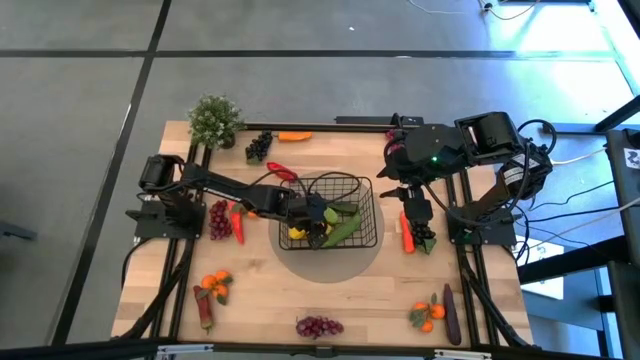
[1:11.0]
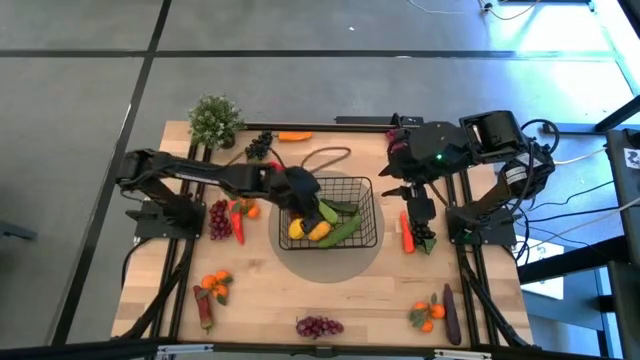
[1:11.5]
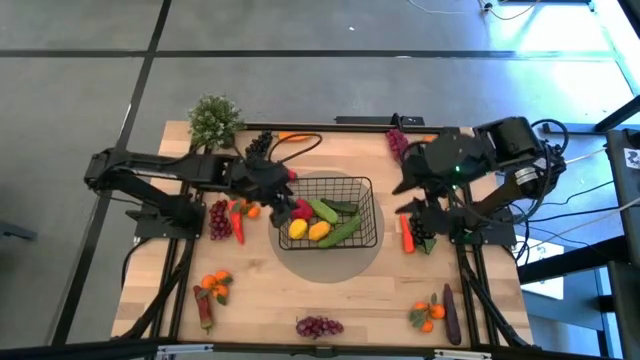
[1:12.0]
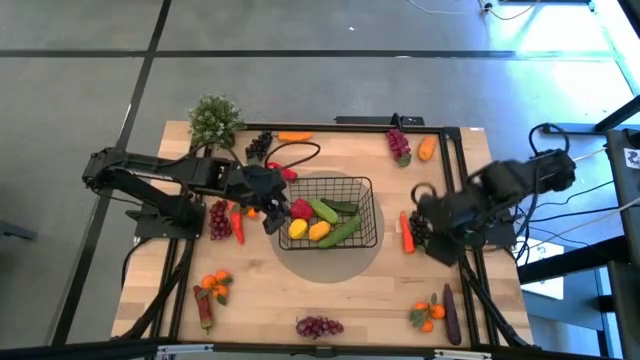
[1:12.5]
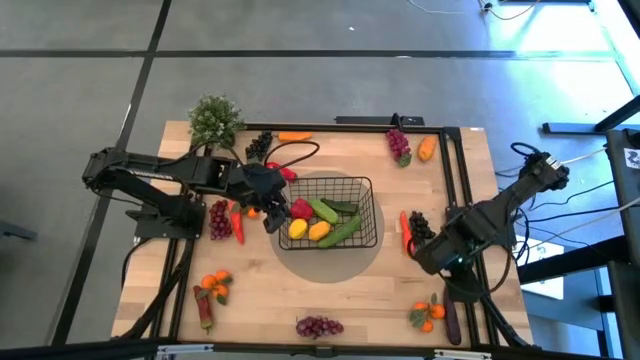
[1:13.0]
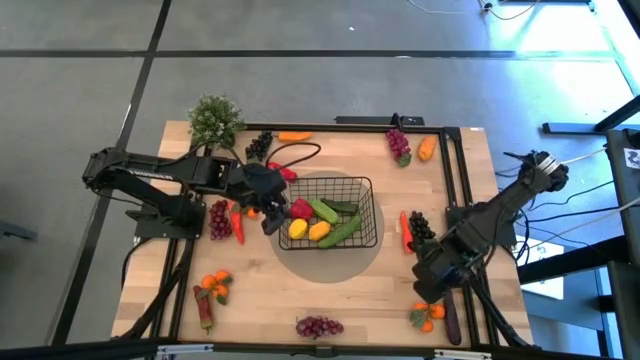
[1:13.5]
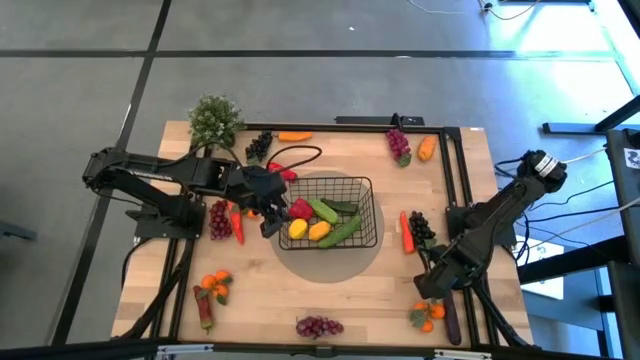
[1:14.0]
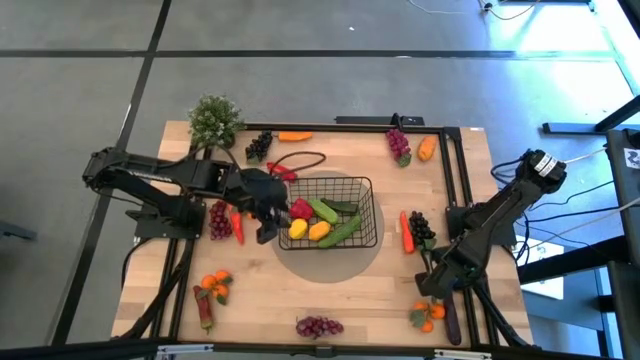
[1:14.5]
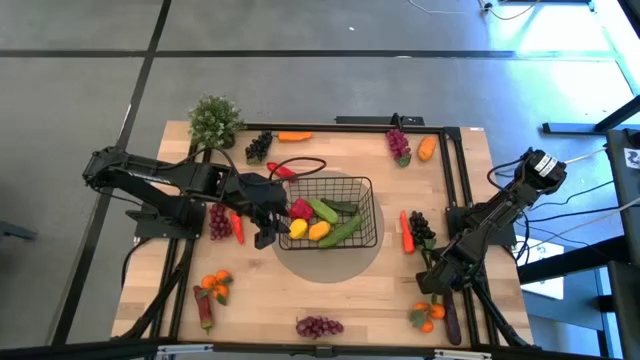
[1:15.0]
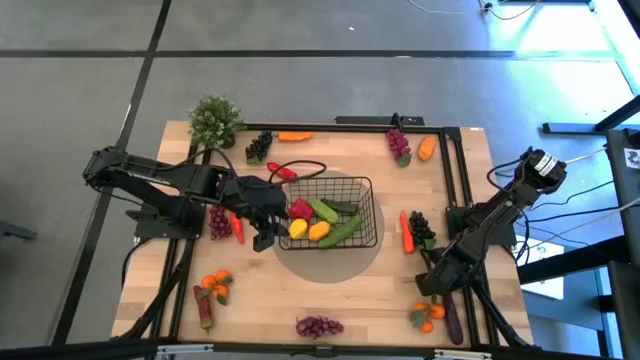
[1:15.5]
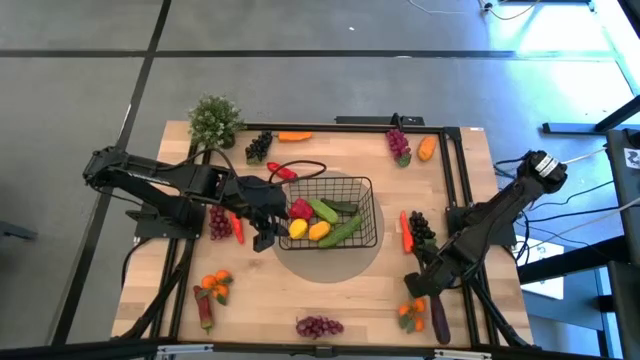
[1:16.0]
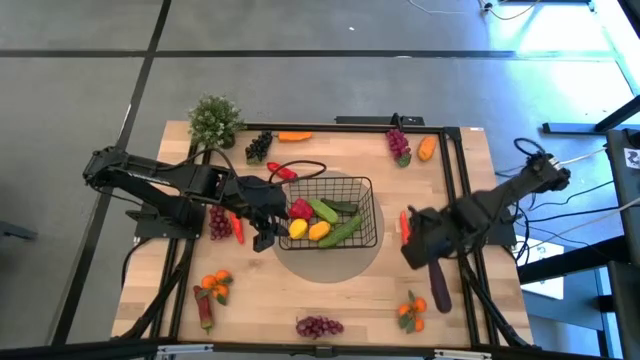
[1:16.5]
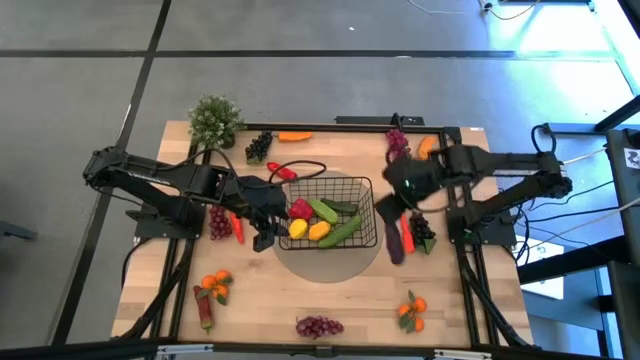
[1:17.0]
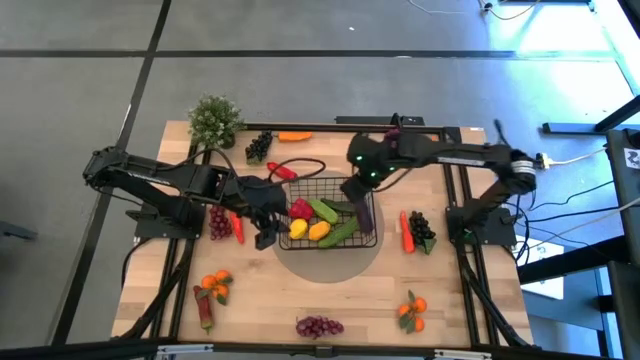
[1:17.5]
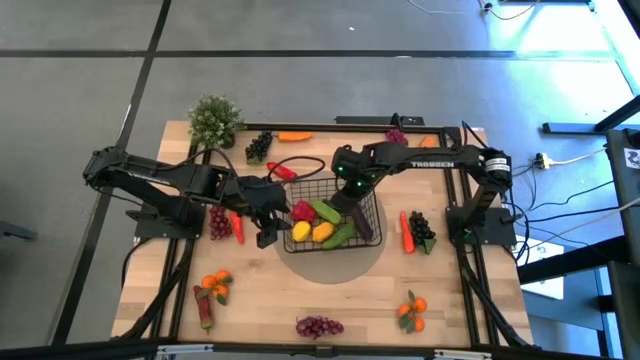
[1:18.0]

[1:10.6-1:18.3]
Task: Build produce basket
Put the eggplant into the basket

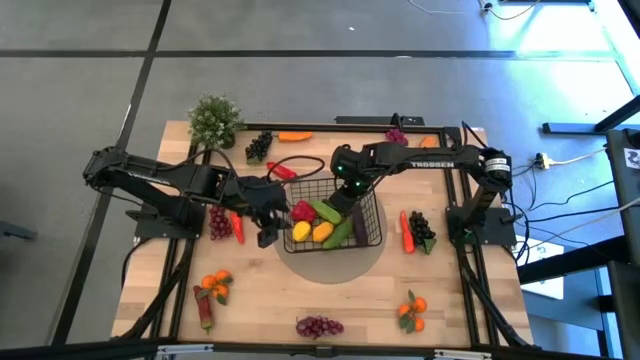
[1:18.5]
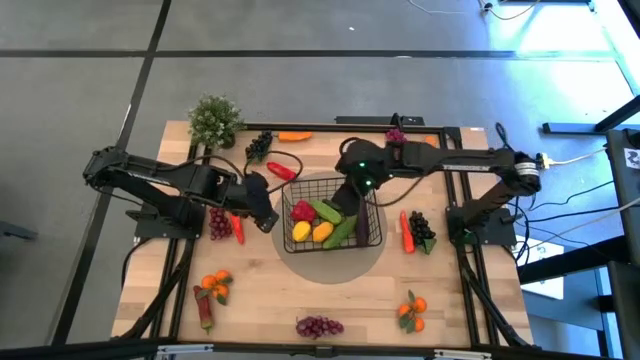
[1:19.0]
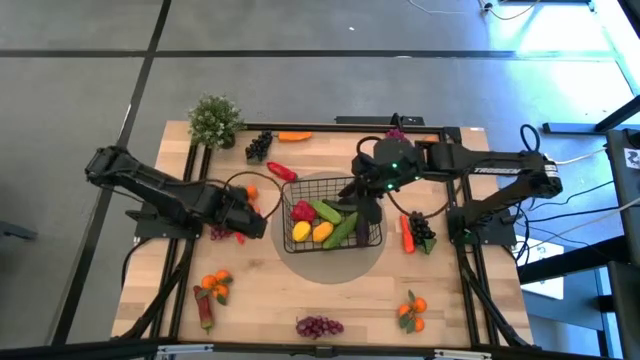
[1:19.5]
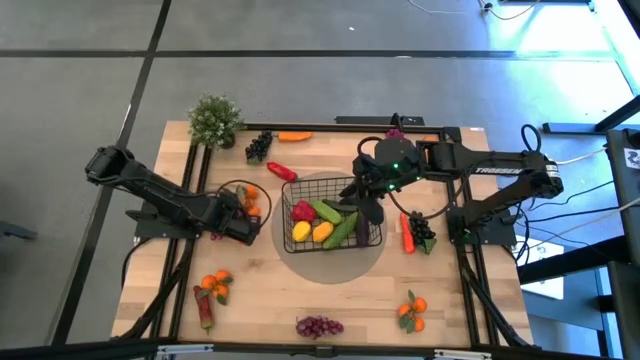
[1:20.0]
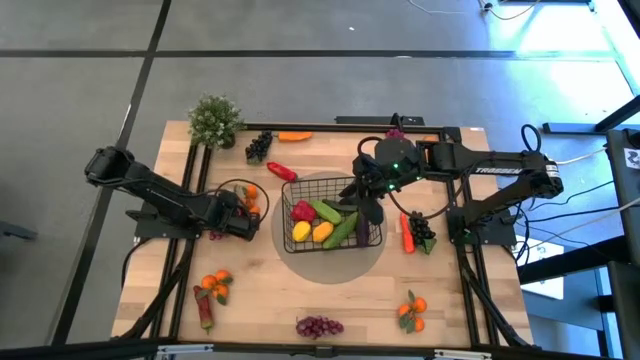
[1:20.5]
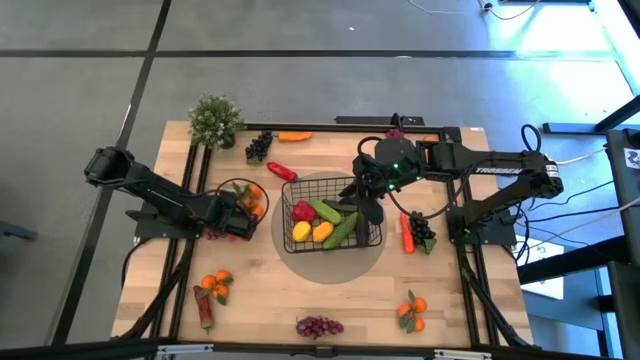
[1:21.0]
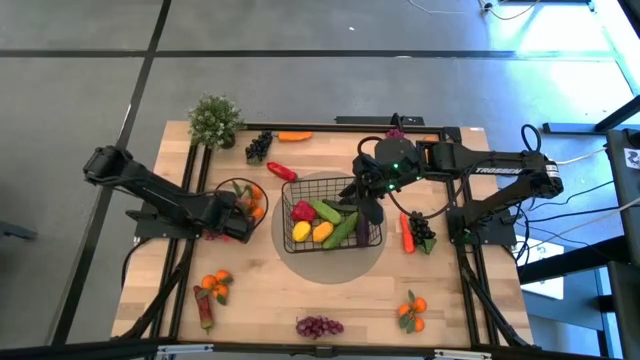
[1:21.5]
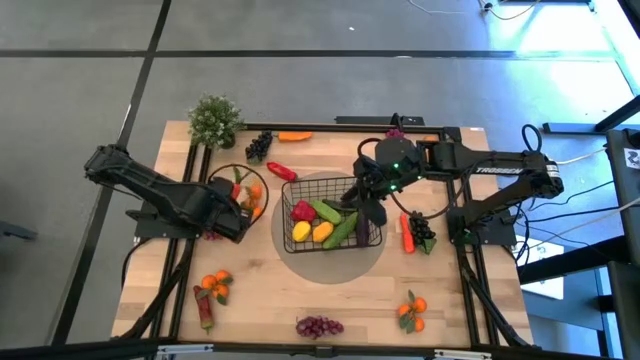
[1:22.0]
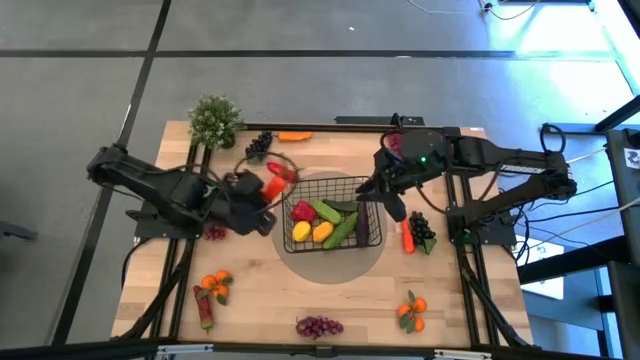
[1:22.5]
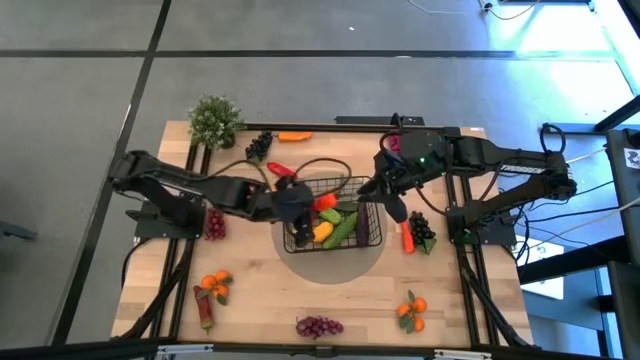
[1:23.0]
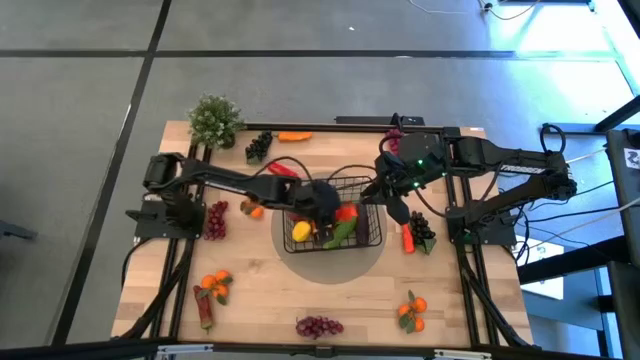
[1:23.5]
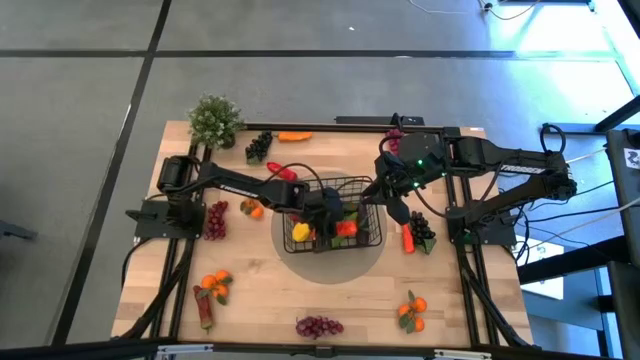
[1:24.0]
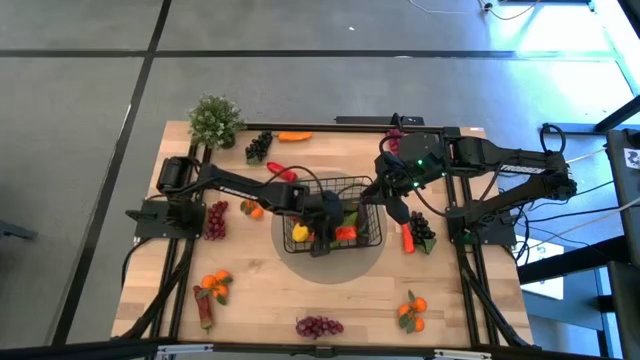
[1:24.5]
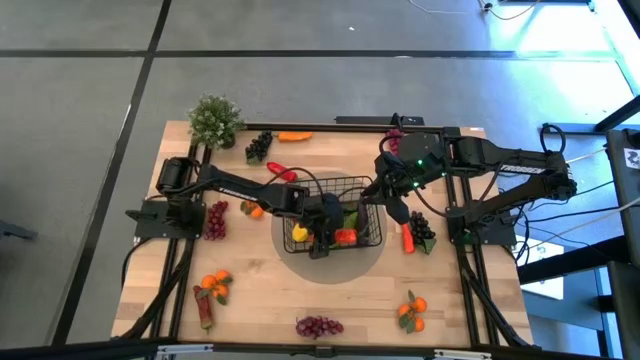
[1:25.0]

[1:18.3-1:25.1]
Put the left carrot into the basket

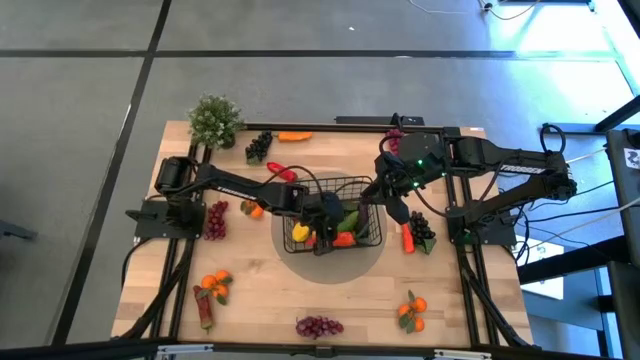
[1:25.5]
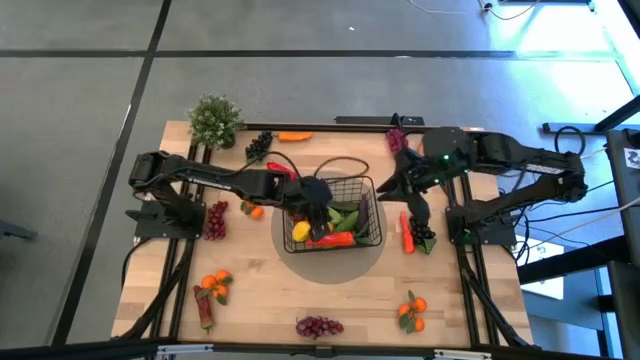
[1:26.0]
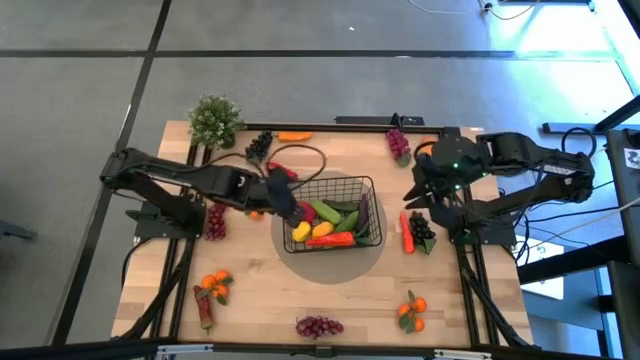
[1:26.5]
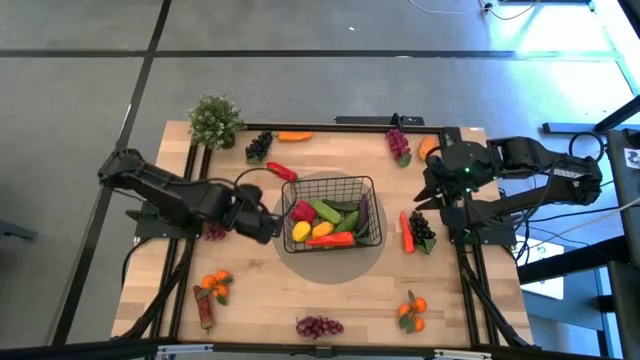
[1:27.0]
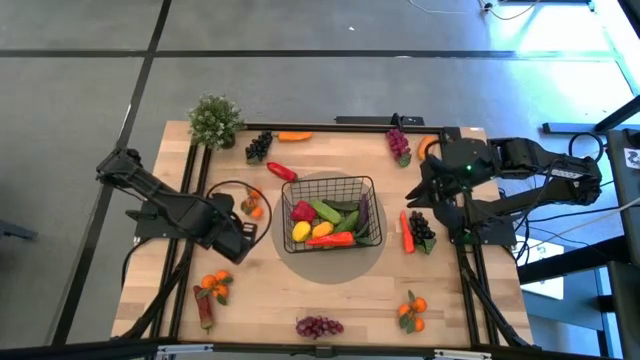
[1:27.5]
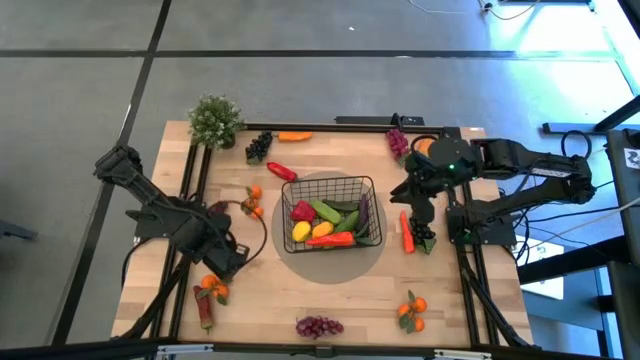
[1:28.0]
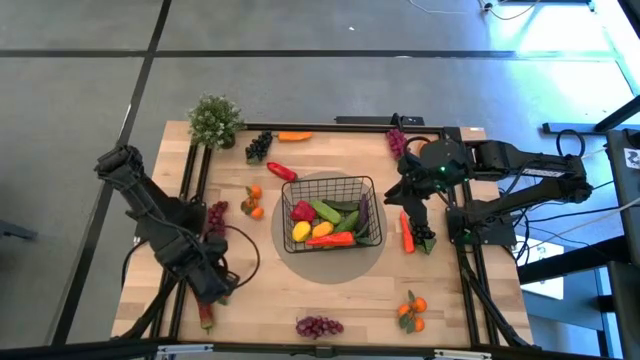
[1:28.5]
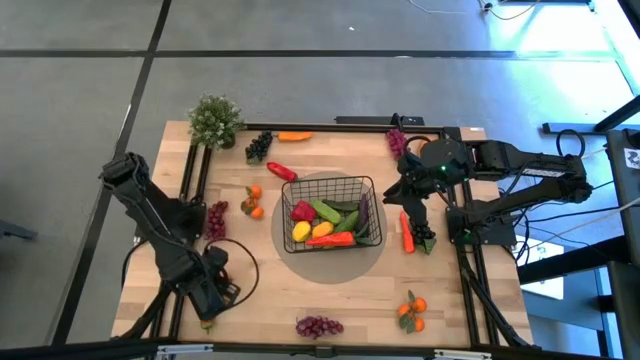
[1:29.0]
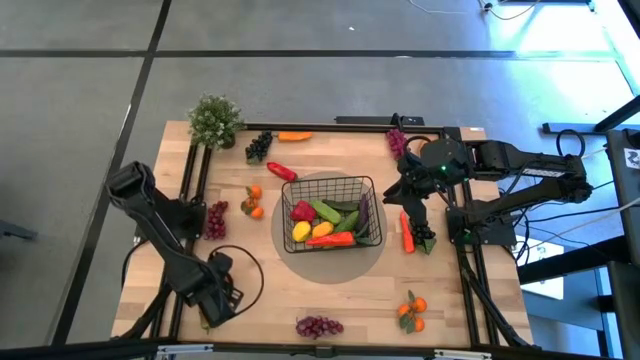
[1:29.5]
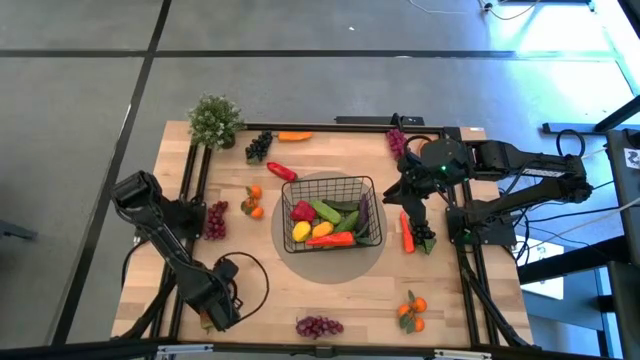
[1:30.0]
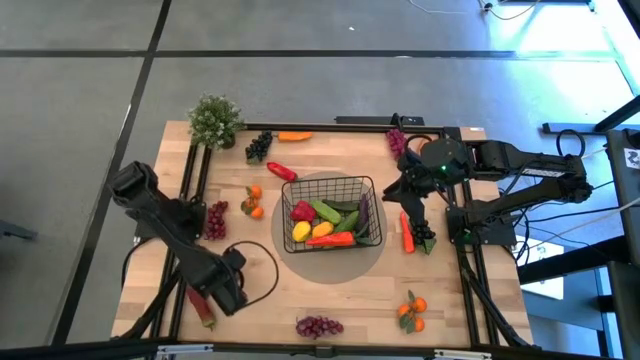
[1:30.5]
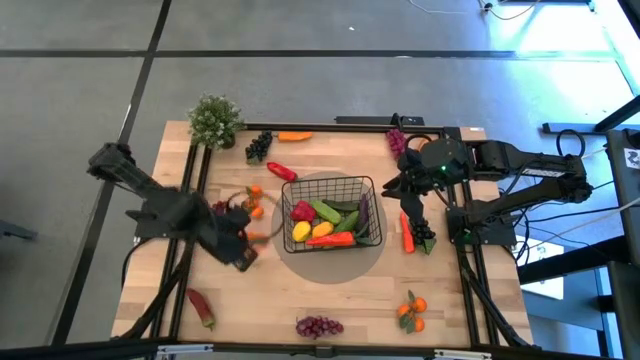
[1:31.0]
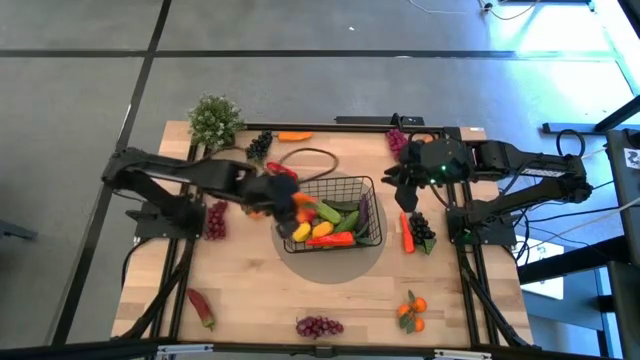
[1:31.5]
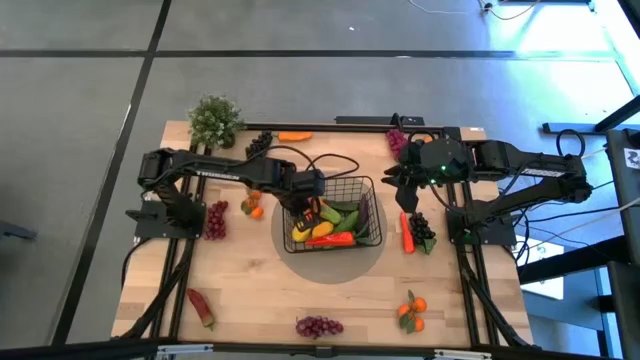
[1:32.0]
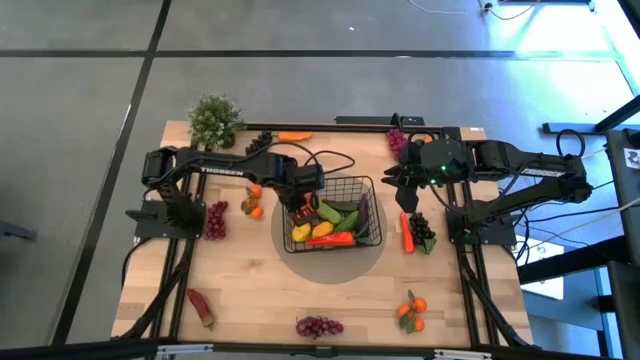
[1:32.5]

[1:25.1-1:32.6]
Put the bottom left orange into the basket
